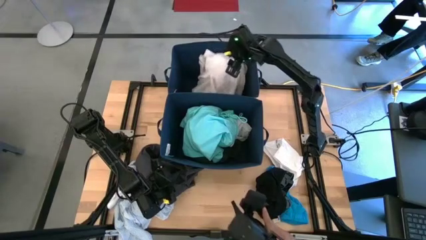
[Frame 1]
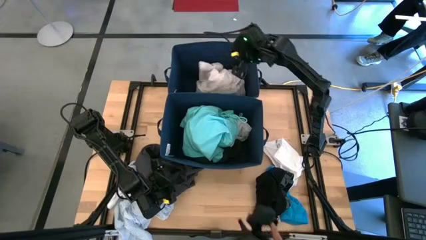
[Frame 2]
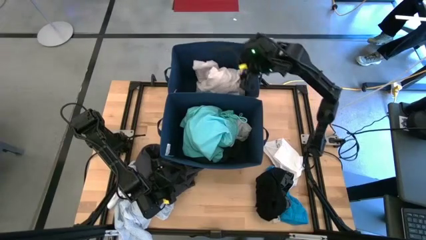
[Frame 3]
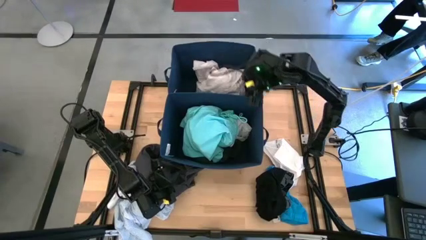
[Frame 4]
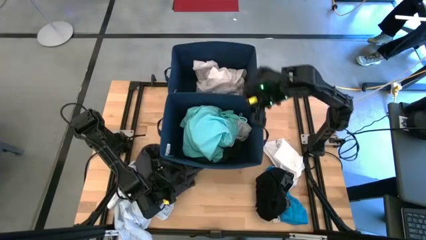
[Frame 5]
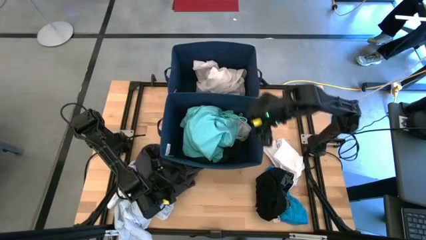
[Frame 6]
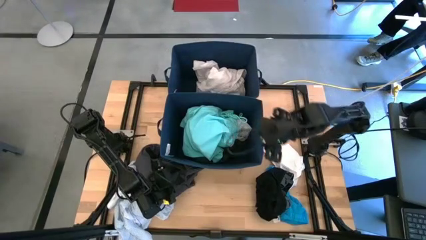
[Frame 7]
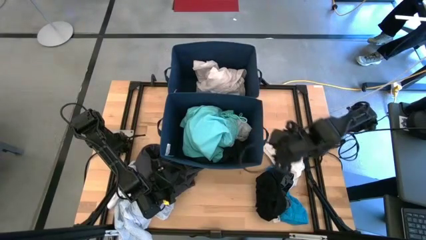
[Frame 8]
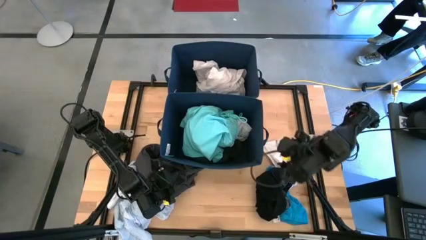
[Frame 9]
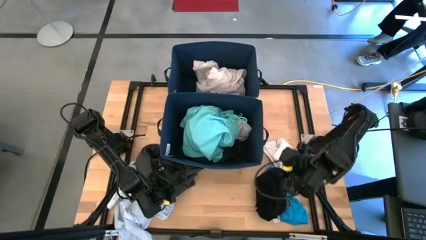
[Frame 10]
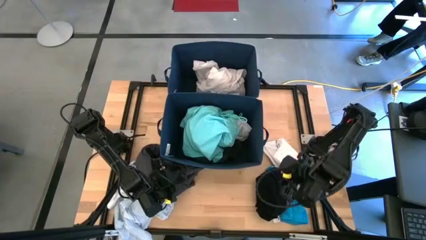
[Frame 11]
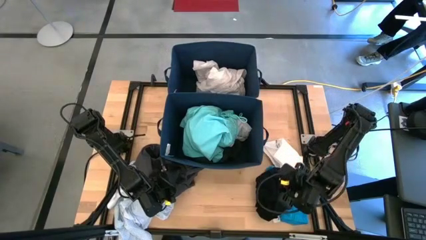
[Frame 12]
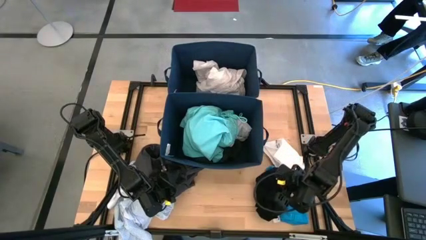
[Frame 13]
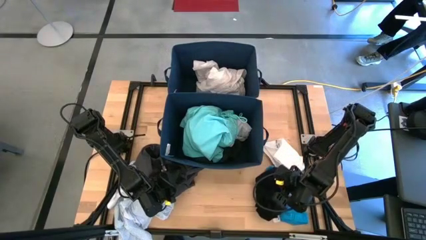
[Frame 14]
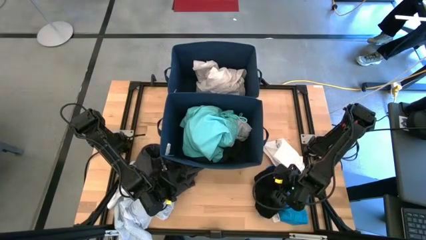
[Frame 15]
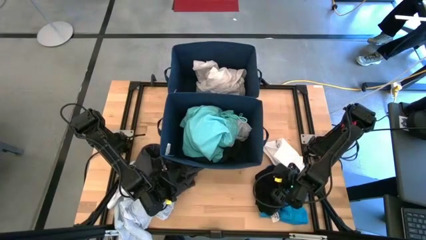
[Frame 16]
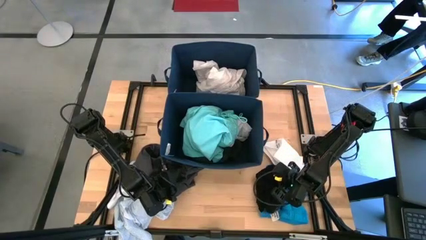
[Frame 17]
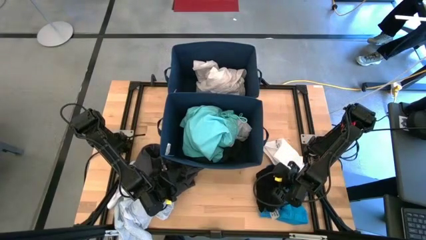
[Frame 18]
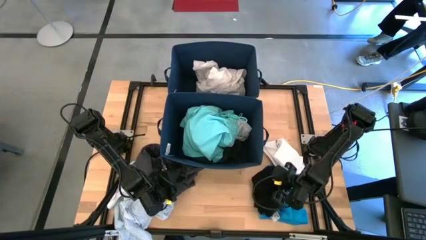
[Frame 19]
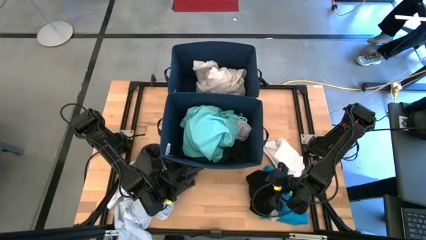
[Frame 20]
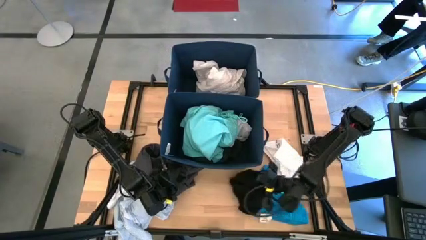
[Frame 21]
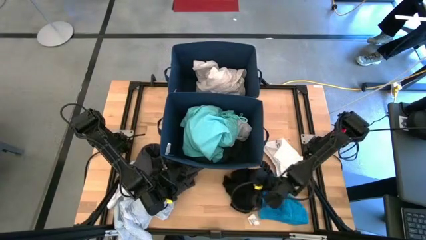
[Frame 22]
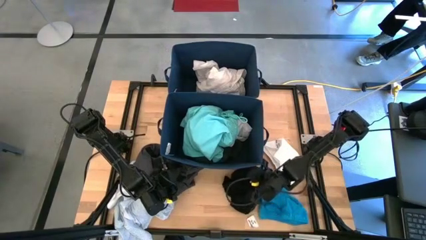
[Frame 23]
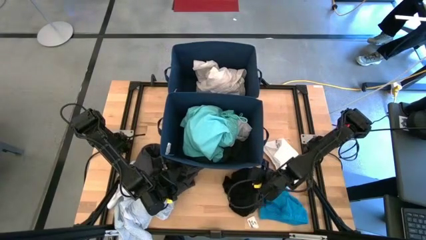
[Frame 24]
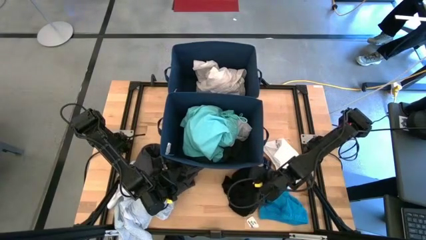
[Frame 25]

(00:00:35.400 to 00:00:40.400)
Task: Sort clothes
Move the black boxer to the left

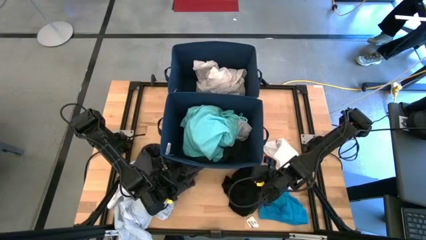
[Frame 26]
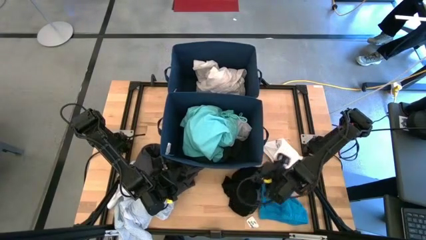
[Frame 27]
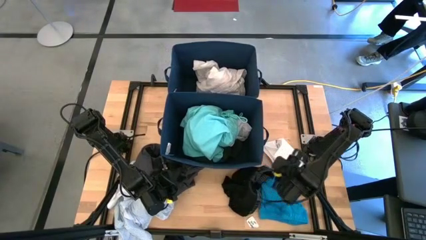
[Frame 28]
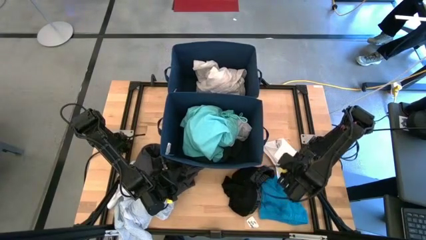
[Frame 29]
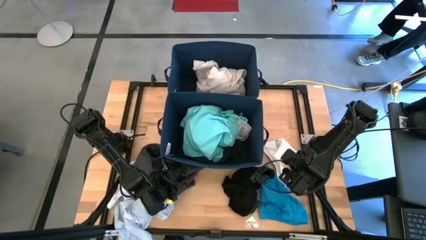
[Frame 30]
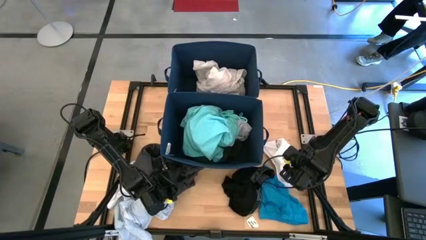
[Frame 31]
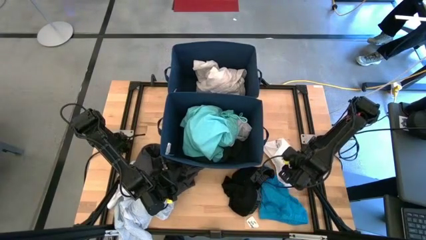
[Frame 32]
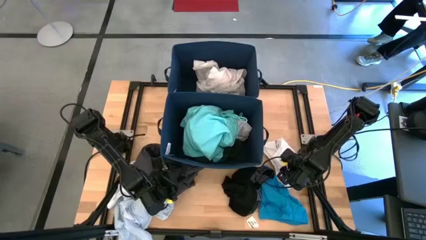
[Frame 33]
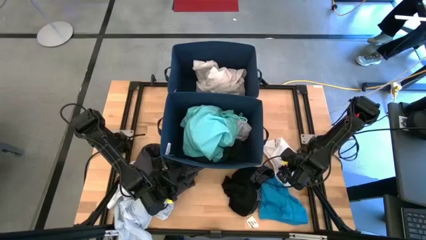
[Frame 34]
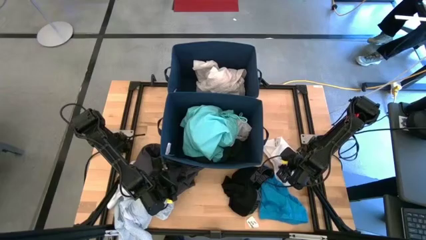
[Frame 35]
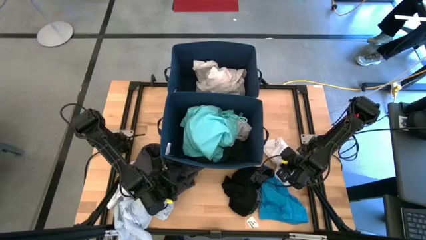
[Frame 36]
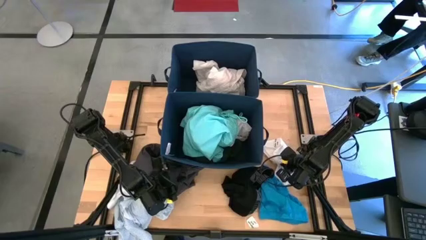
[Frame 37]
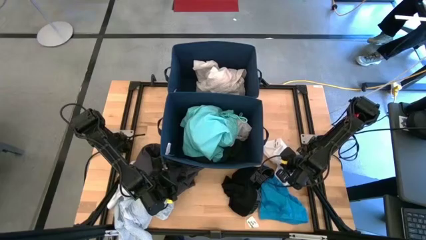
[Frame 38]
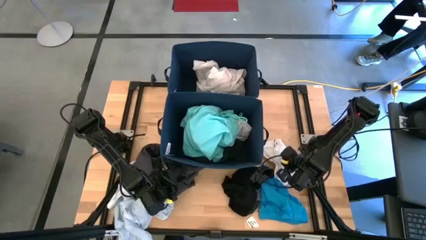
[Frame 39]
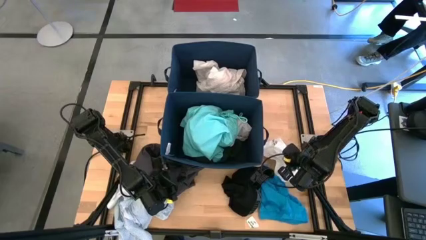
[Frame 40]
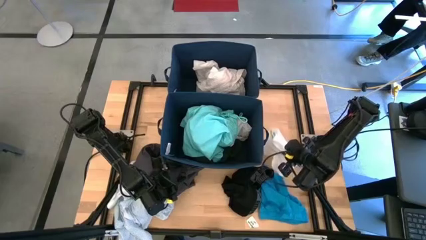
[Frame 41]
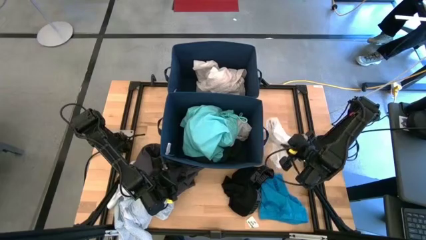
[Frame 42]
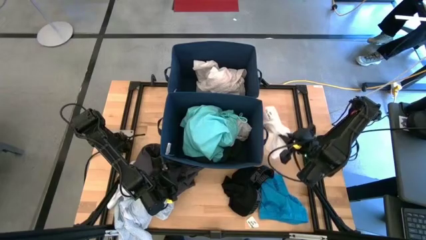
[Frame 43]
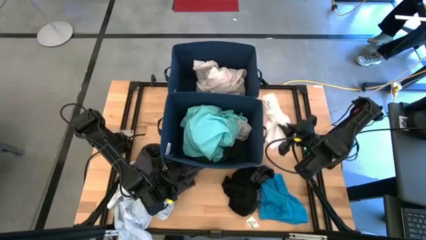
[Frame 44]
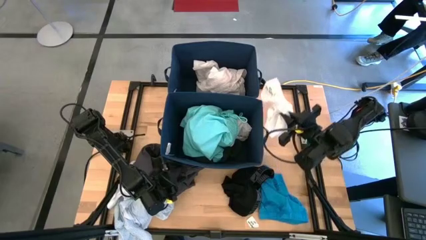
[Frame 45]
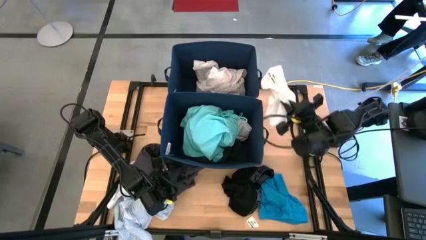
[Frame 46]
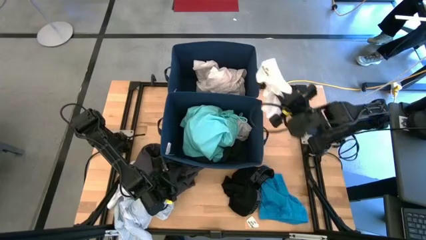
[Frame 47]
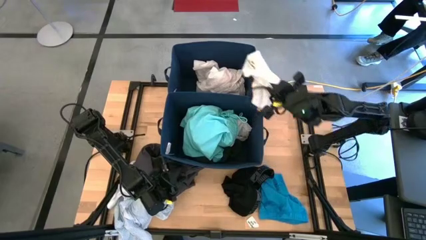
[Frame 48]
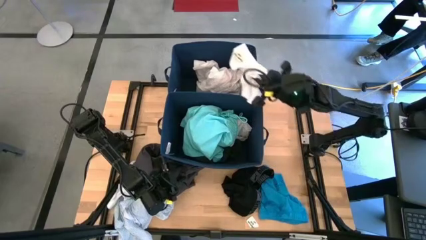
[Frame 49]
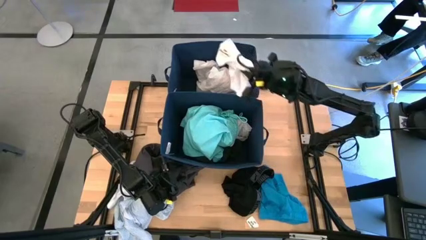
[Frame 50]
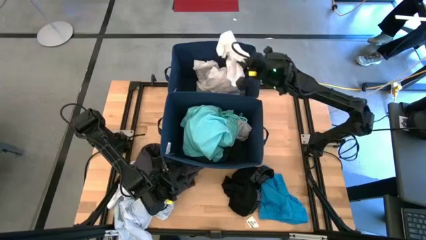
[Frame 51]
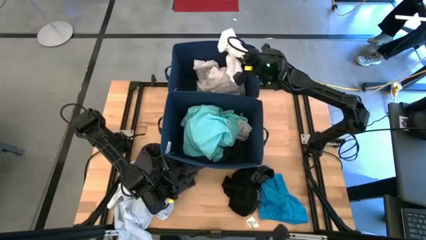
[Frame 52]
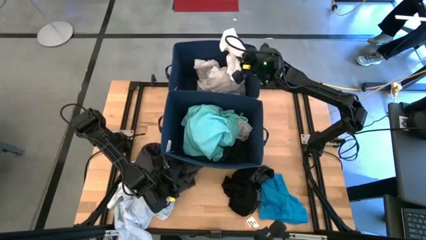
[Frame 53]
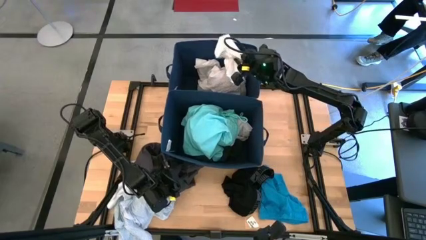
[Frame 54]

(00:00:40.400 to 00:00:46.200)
Put the white underwear into the top blue laundry bin

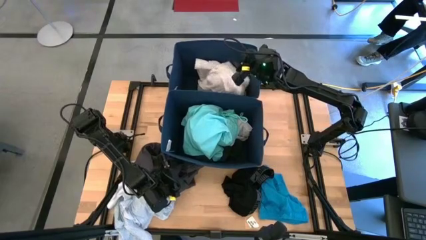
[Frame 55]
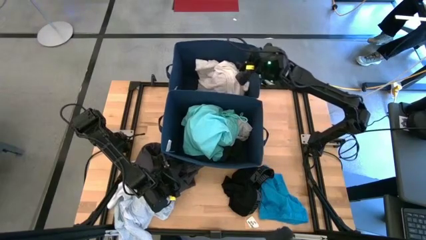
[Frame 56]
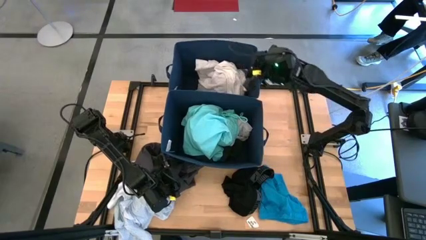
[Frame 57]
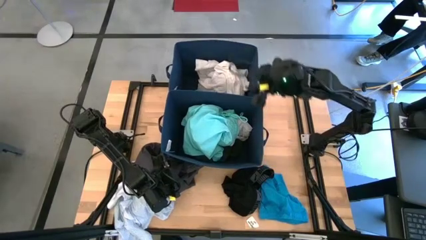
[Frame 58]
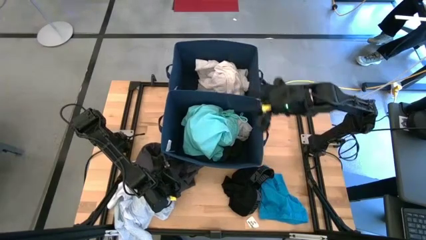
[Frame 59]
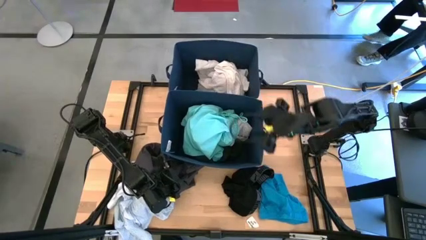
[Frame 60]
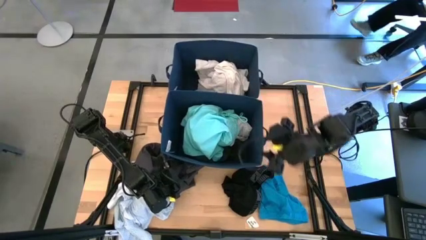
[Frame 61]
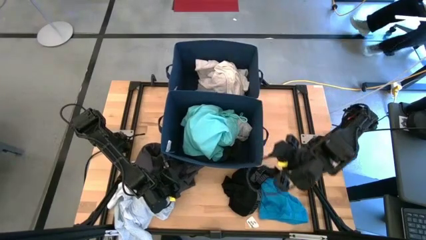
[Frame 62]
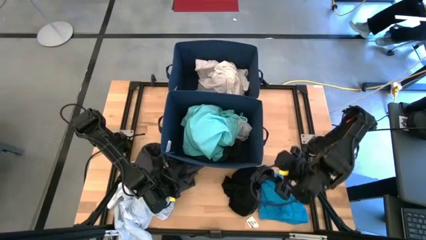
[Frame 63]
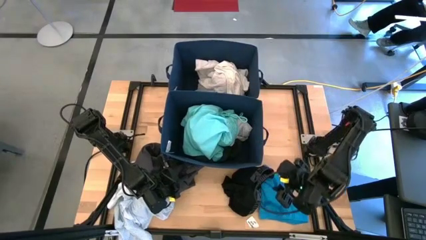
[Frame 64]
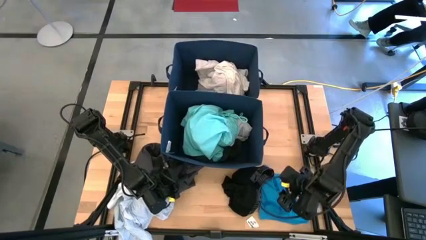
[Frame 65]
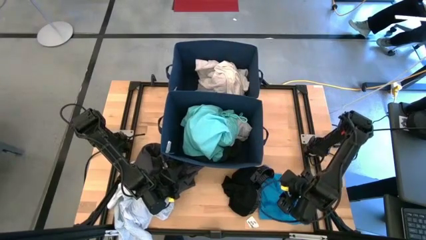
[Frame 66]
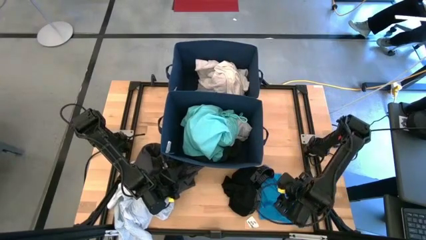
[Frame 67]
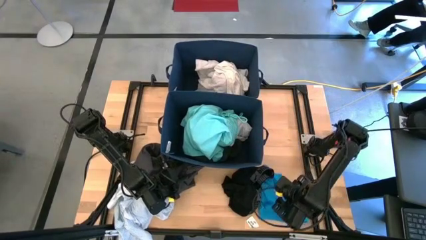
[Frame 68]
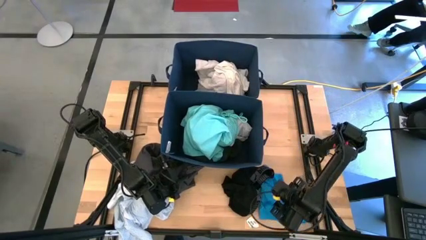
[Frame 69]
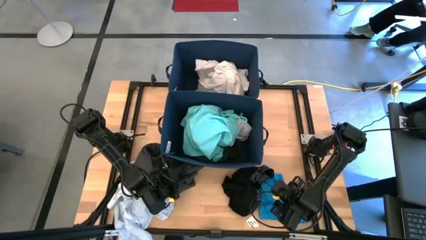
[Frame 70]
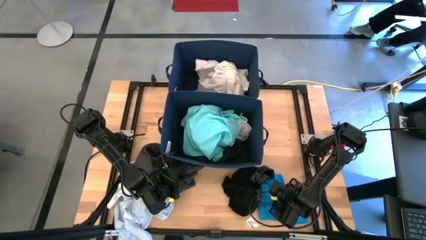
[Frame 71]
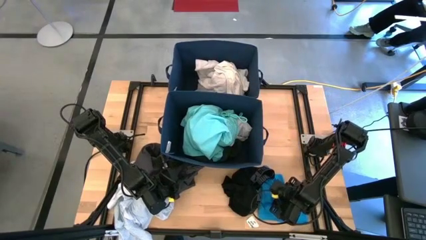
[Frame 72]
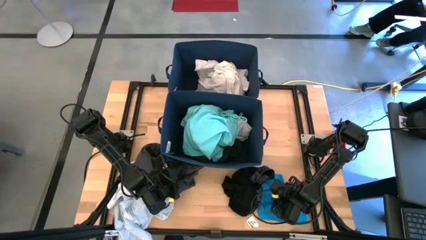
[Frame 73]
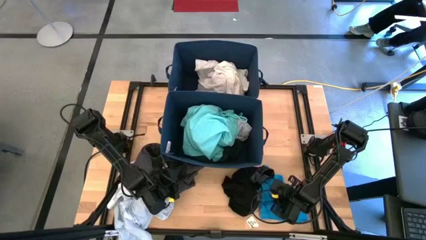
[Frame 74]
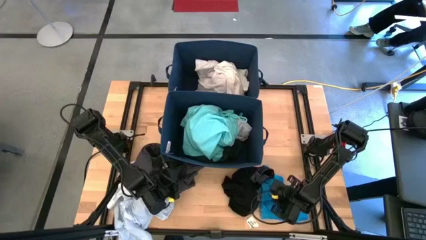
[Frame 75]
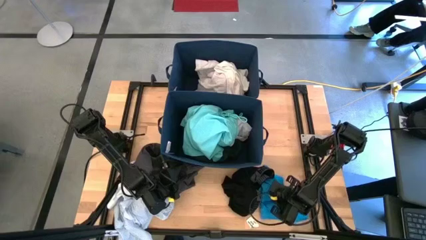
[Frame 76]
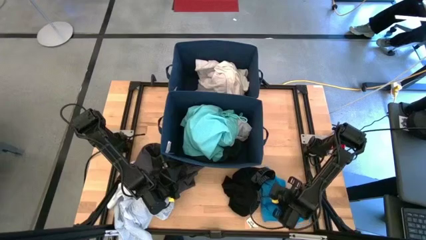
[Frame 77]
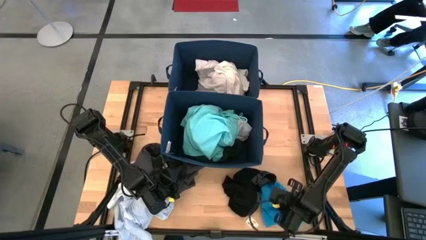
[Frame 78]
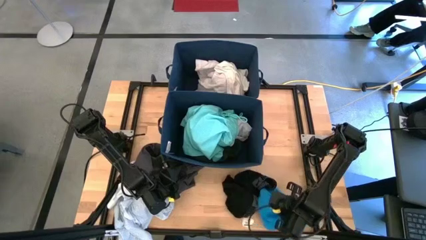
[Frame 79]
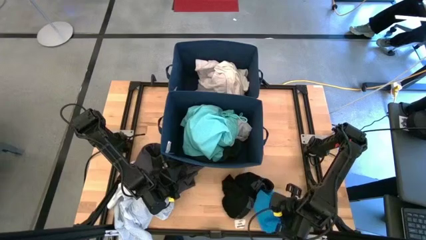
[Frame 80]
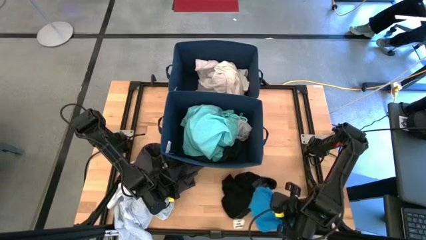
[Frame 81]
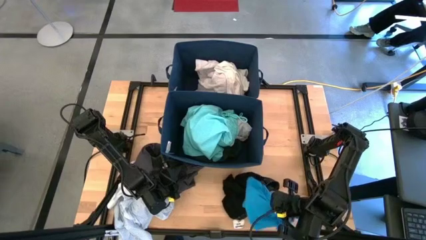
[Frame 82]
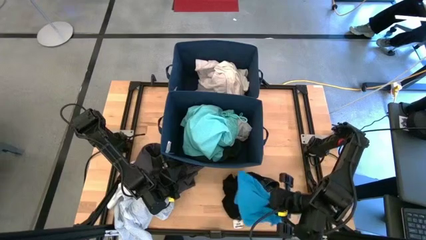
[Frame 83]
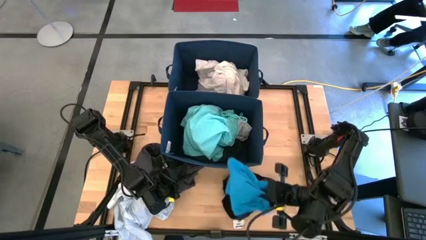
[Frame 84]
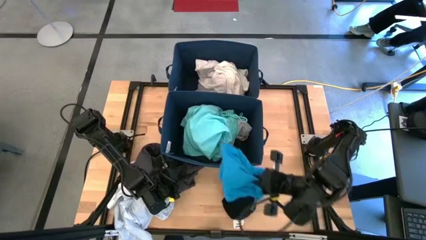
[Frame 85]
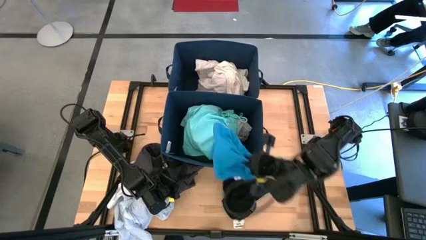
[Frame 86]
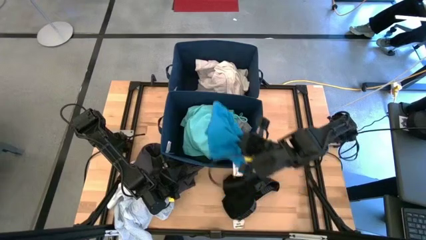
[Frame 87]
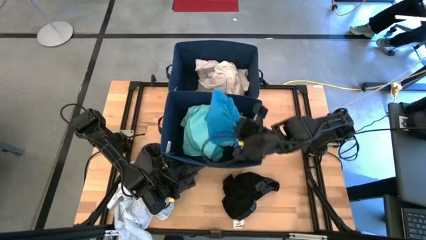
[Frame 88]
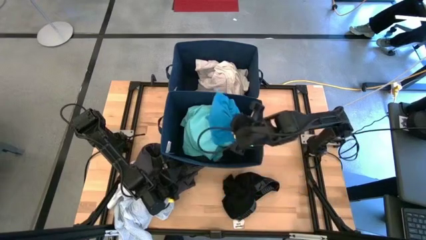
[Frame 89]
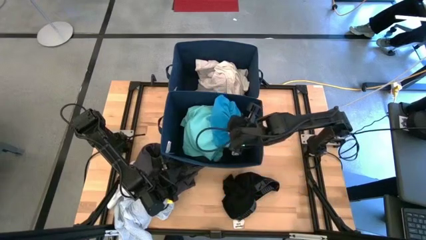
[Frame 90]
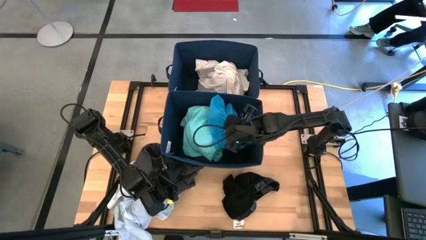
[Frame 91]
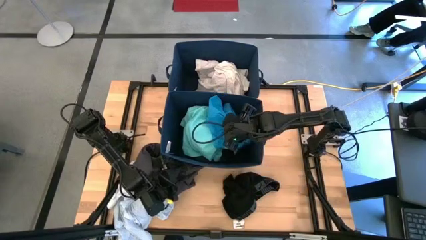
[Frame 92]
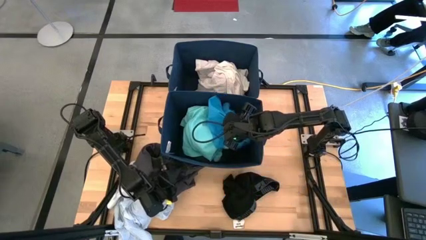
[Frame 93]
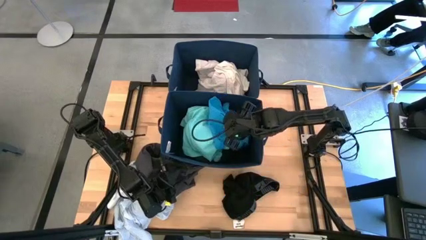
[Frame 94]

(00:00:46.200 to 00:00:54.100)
Put the blue short pants into the bottom blue laundry bin
